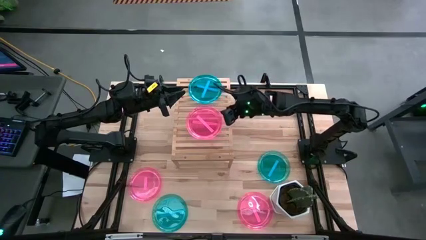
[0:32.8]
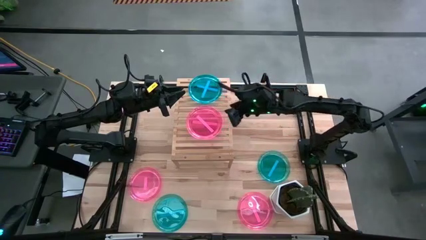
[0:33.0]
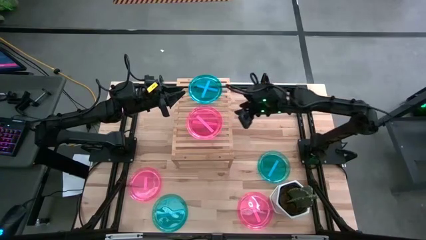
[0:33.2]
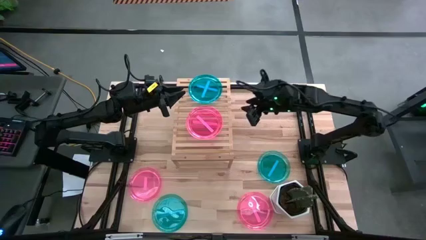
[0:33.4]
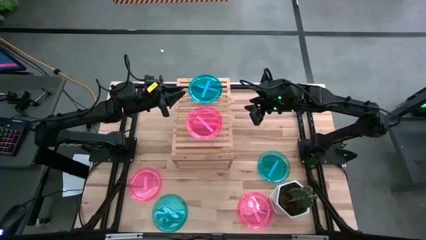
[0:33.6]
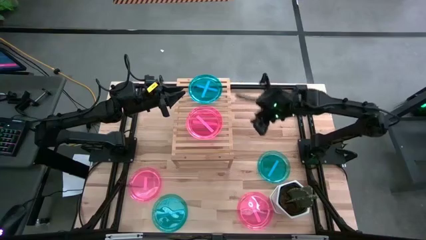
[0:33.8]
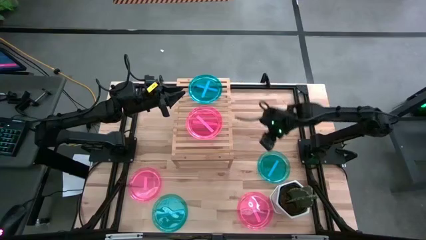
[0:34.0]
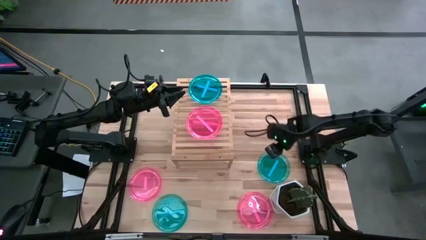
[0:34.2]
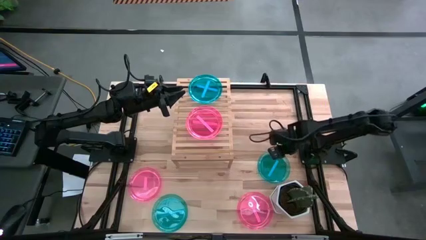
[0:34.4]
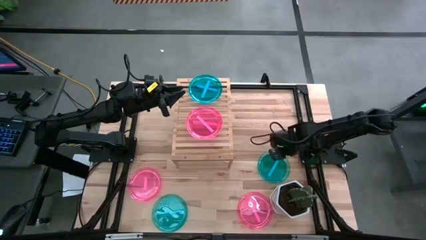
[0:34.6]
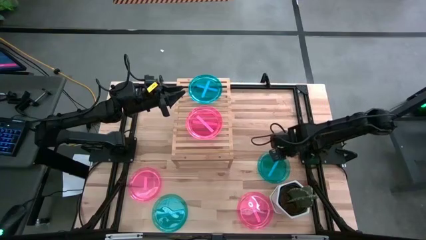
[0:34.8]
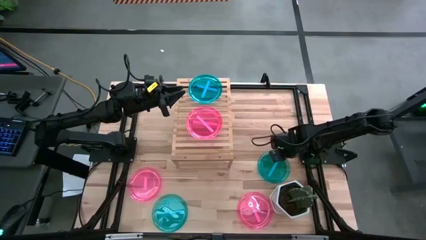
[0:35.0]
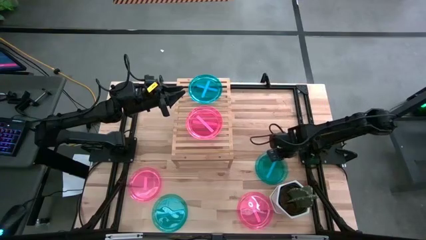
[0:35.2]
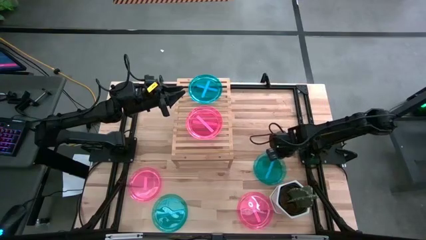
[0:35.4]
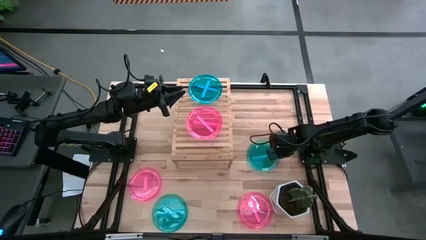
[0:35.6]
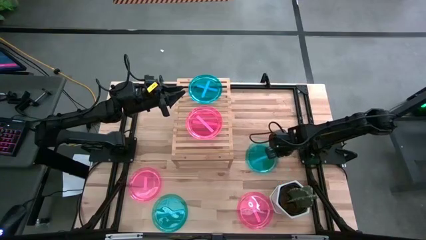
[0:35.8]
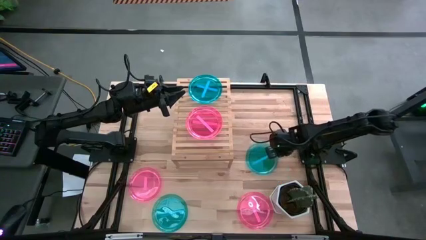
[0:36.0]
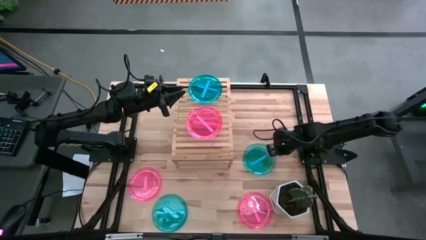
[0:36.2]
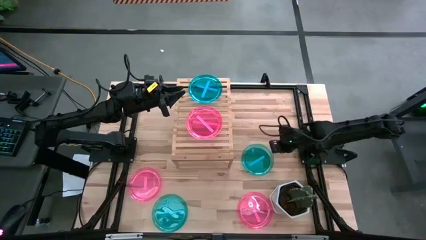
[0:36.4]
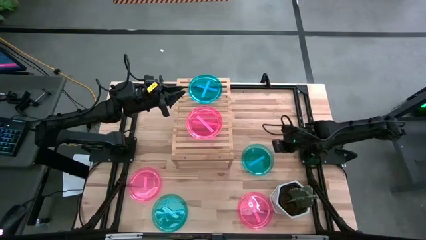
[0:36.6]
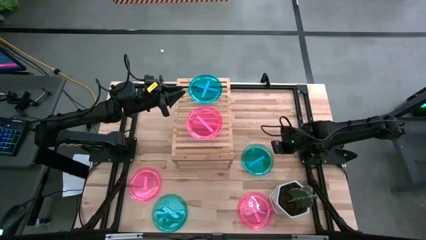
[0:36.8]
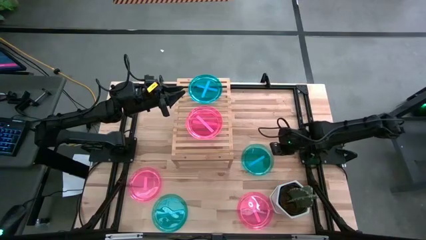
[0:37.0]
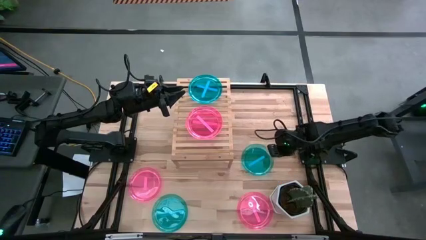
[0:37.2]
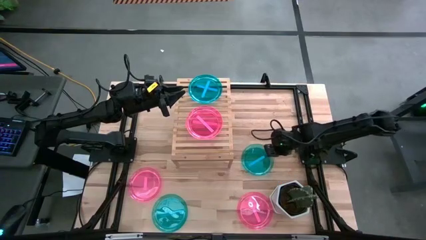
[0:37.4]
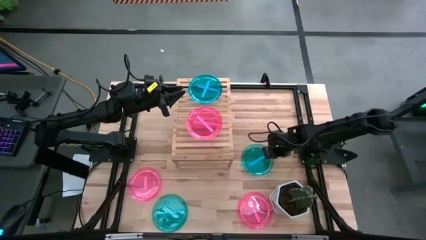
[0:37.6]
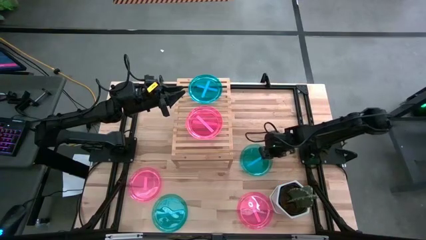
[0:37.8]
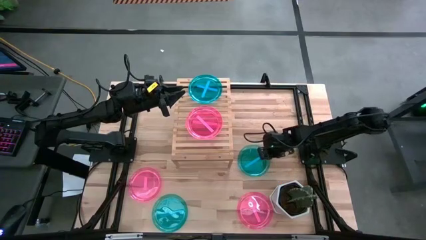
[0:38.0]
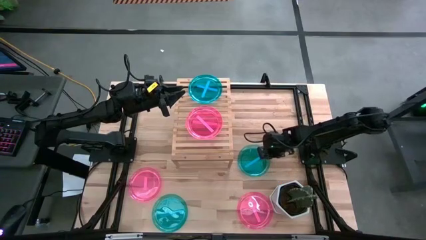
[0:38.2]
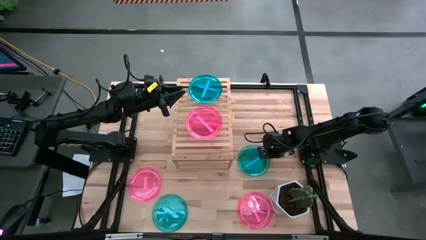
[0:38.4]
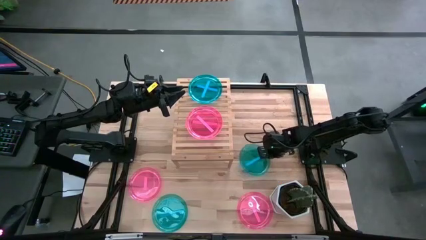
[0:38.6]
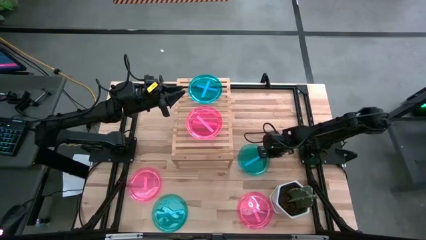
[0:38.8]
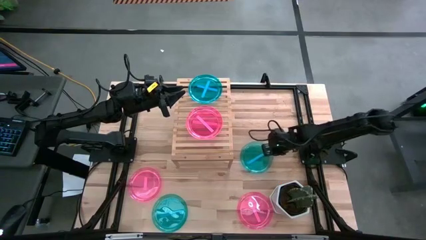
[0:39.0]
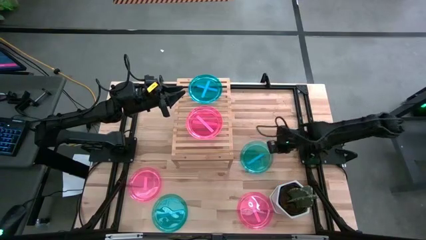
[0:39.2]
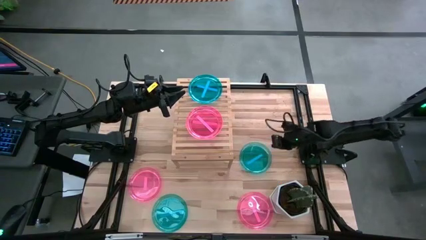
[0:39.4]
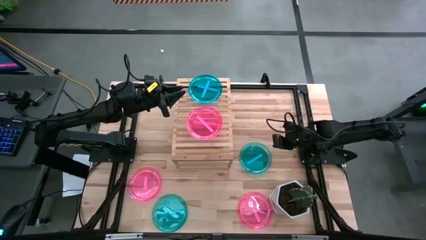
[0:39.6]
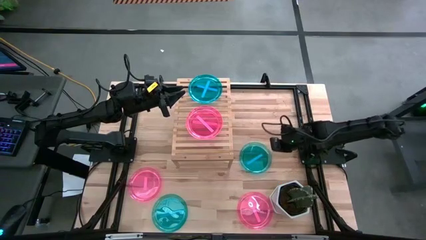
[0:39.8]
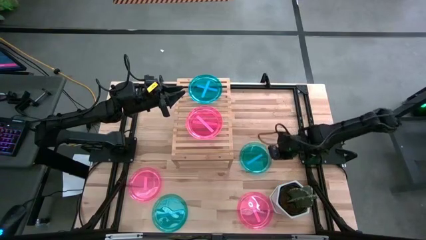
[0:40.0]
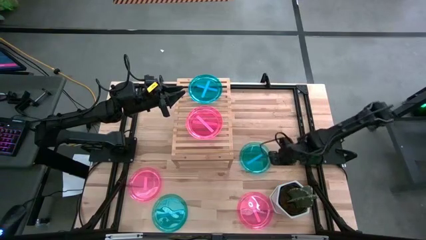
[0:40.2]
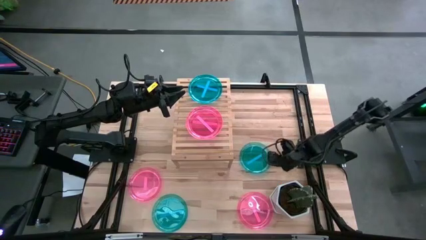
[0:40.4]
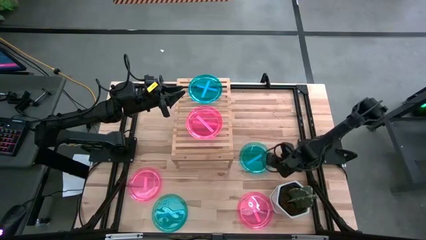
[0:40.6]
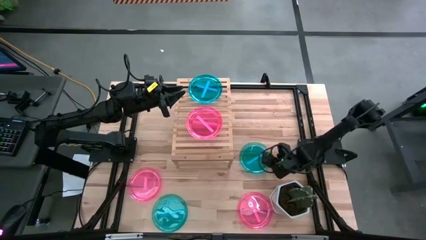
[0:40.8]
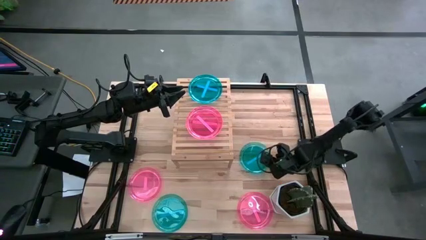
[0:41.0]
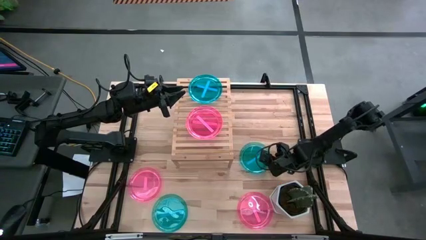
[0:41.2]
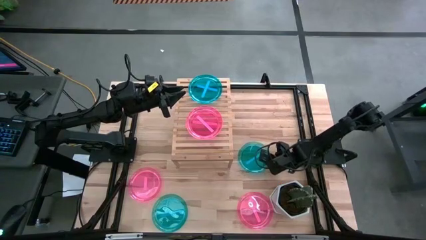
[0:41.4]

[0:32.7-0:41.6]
Task: Place and stack plates onto a shelf
Stack the blue plate on top of the blue plate on the shelf

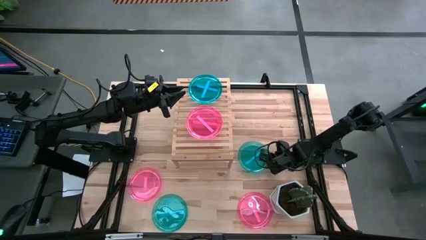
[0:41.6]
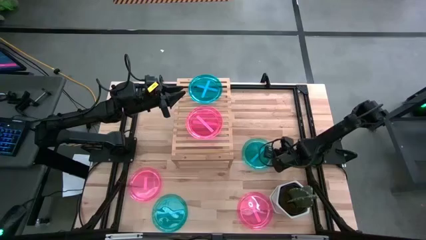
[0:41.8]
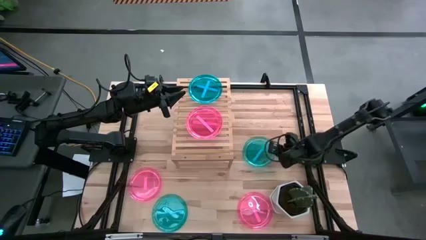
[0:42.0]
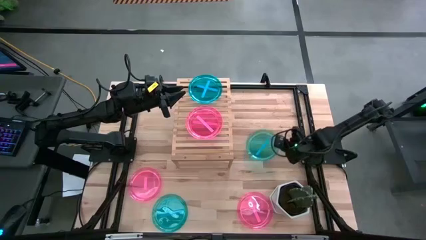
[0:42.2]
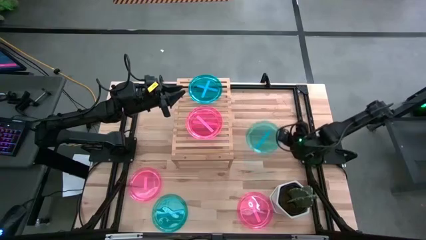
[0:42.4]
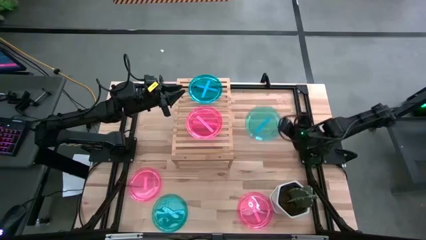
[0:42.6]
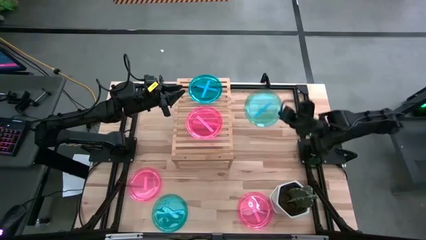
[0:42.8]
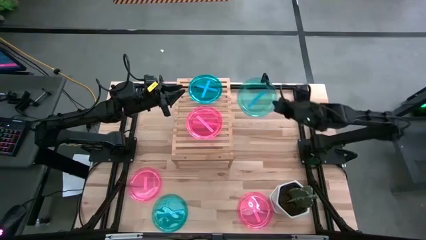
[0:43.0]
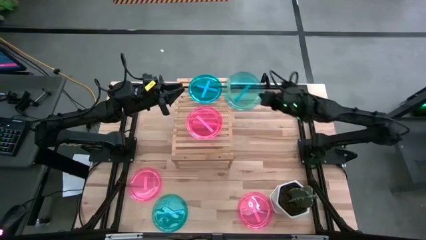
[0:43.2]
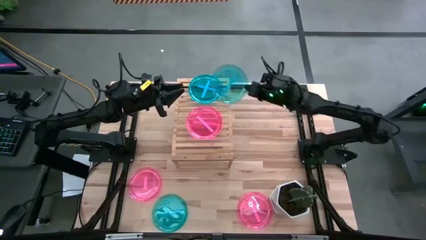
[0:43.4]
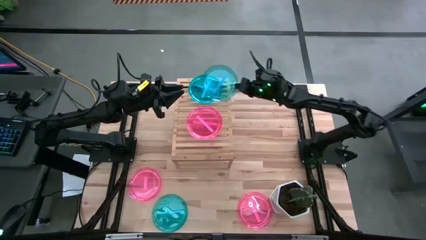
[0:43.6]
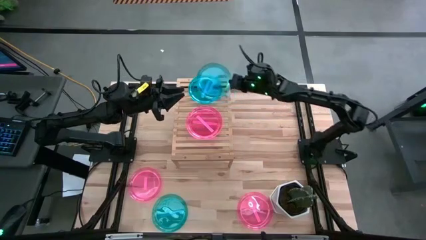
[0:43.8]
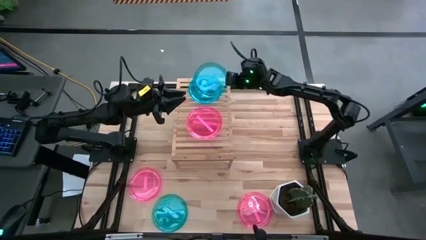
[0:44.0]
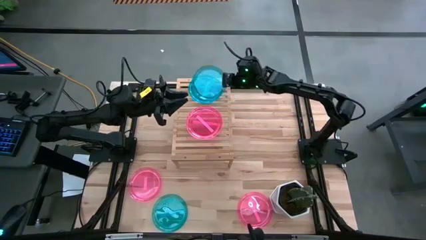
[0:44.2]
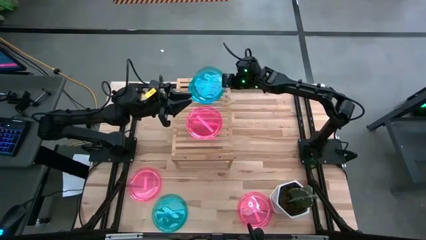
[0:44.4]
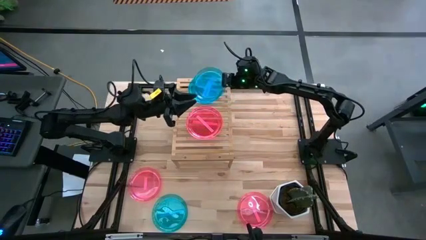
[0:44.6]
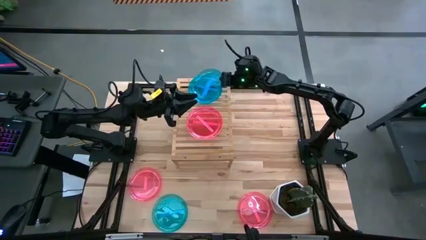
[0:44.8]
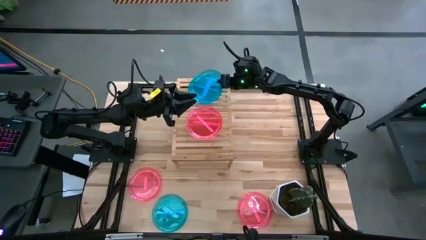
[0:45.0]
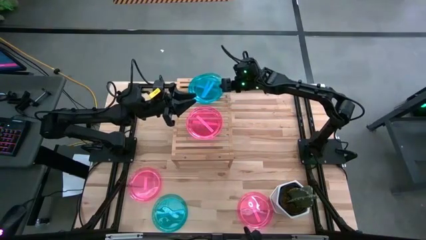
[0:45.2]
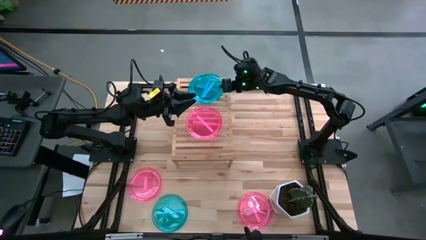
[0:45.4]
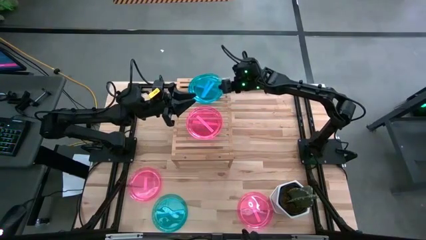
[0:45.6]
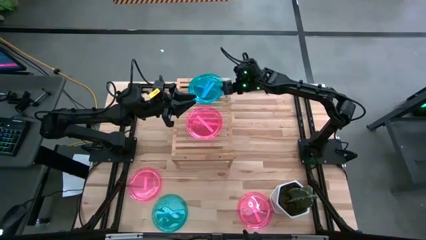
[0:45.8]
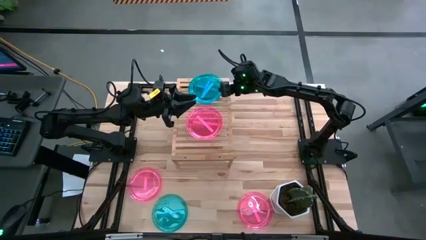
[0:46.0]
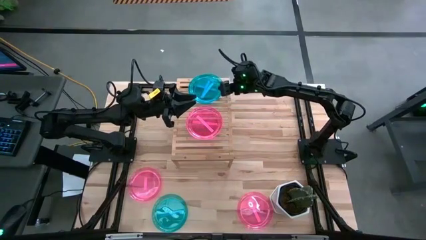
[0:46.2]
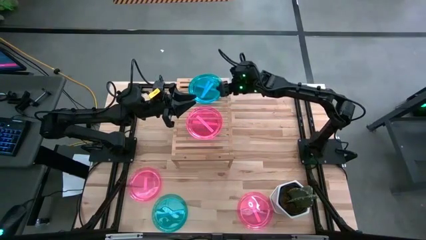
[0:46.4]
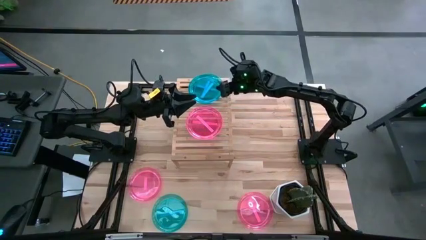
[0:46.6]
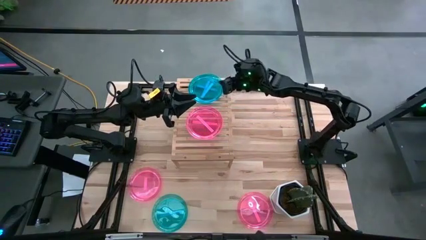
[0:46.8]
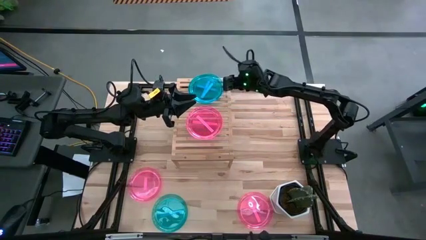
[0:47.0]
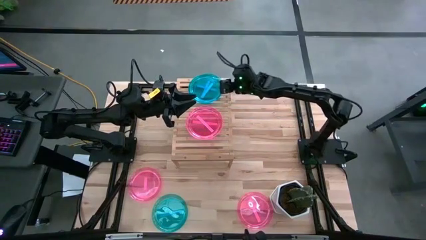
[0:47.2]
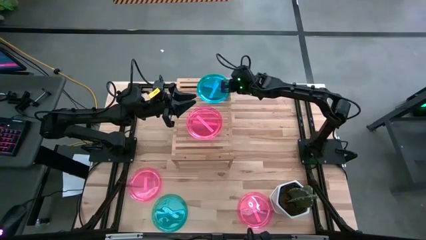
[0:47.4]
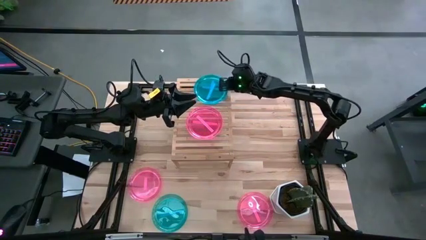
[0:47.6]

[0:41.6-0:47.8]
Stack the blue plate on top of the blue plate on the shelf

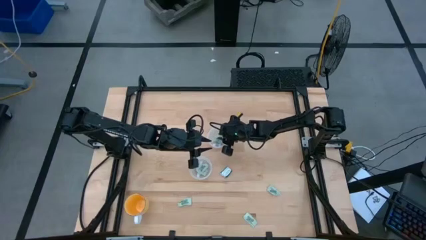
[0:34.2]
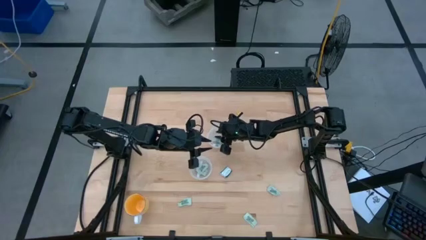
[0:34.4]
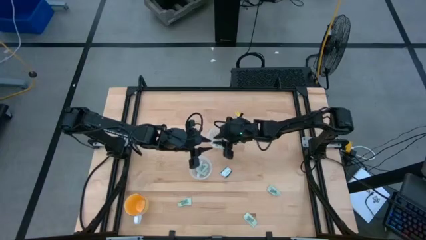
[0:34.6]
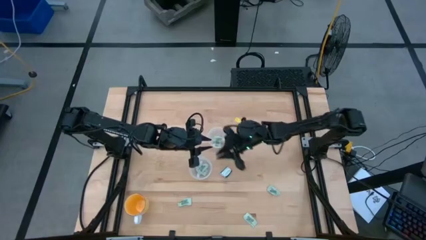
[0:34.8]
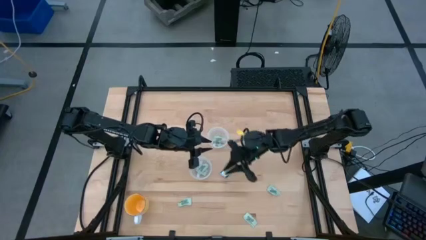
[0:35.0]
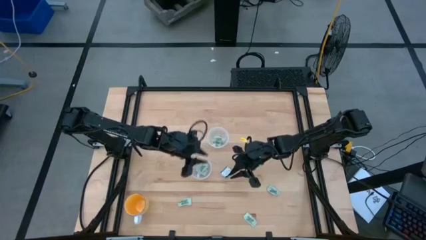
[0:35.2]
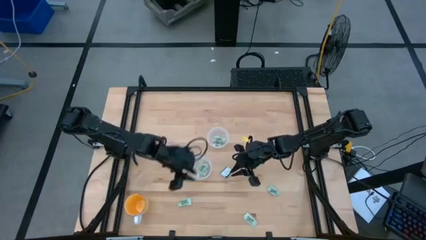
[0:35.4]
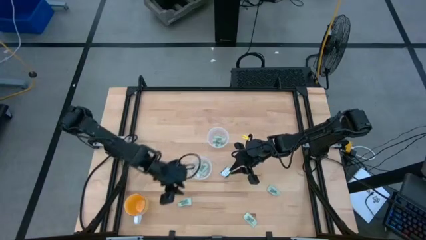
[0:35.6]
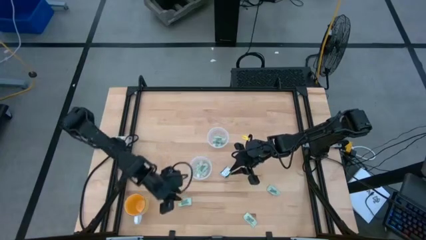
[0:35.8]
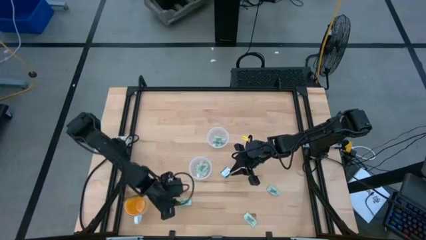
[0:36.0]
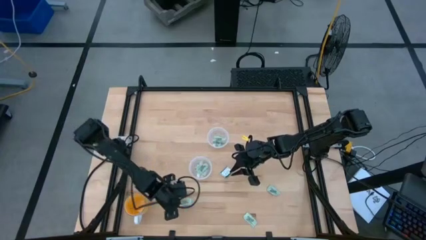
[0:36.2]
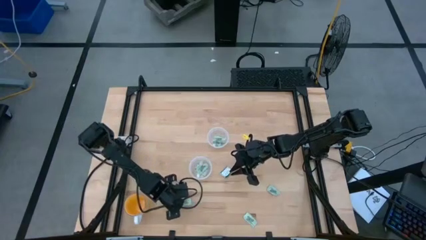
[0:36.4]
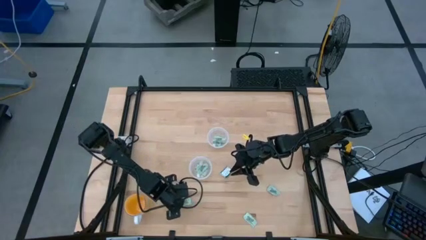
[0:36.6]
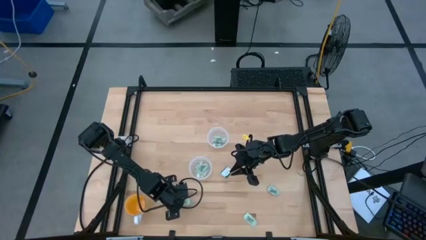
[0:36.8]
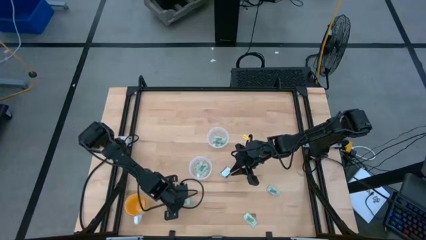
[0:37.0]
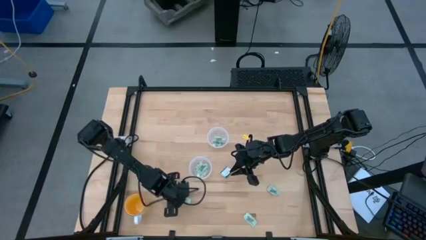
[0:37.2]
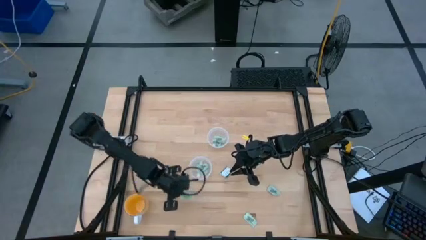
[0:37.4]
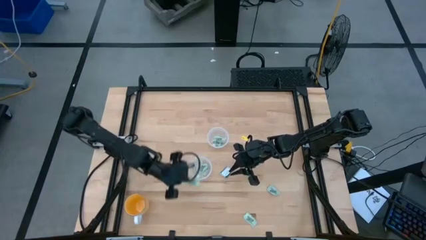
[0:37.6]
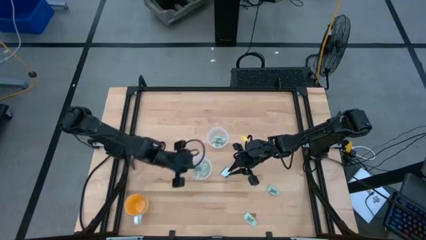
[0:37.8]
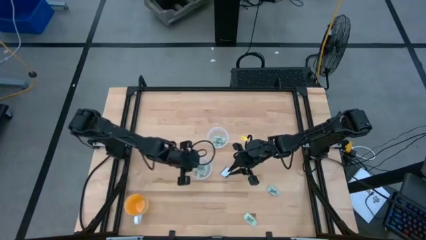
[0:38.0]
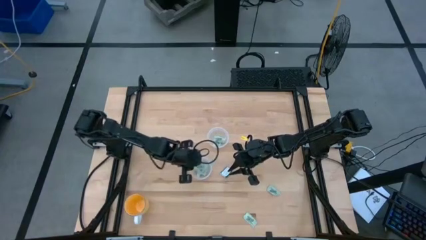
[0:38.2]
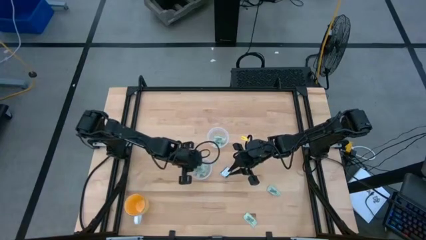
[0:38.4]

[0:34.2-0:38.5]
Task: Pick and place Stevia / Truvia into bins
Put the stevia packet into the bottom transparent container
